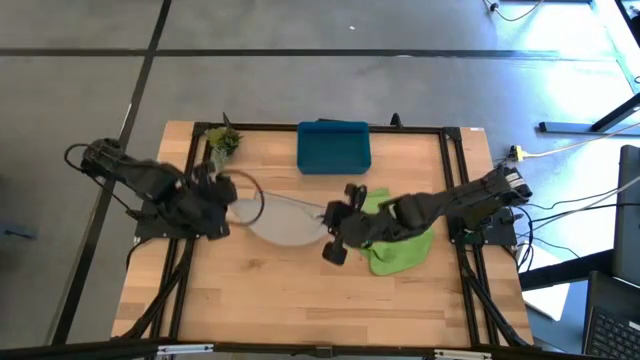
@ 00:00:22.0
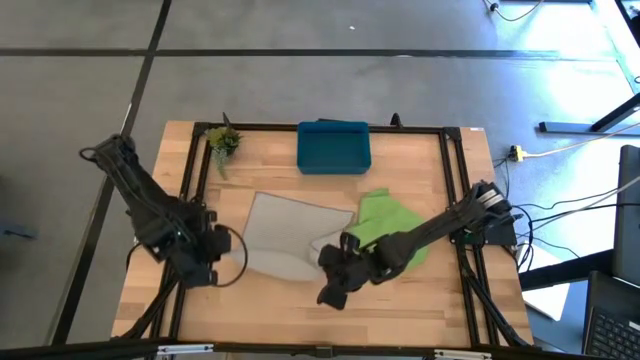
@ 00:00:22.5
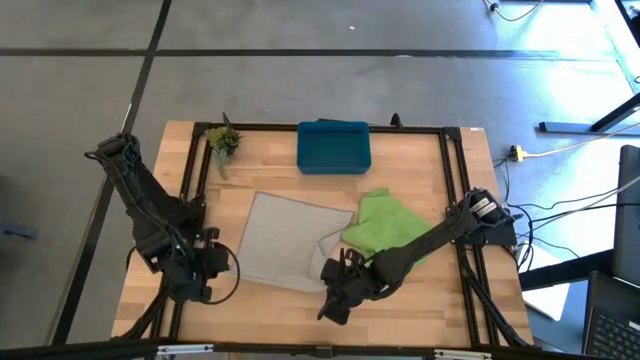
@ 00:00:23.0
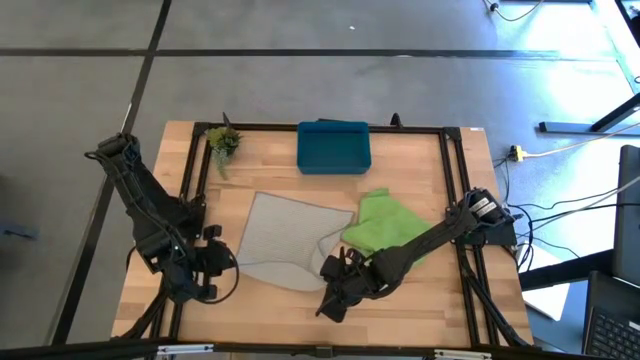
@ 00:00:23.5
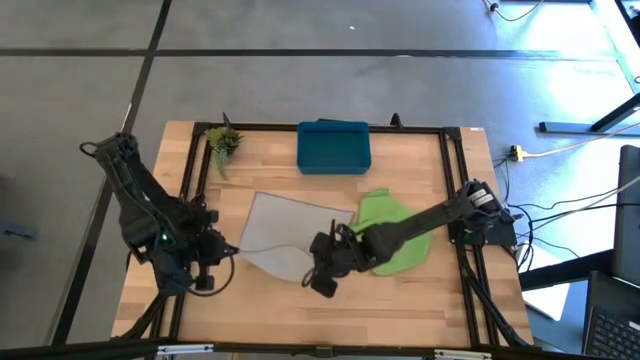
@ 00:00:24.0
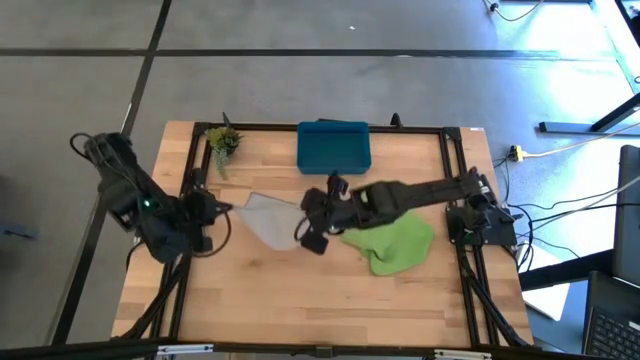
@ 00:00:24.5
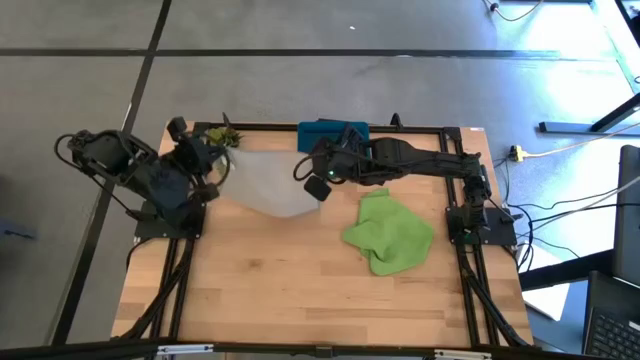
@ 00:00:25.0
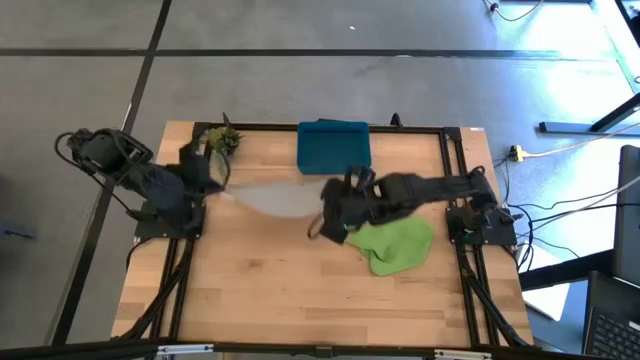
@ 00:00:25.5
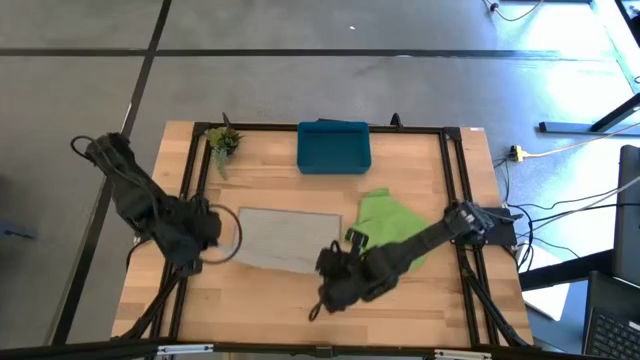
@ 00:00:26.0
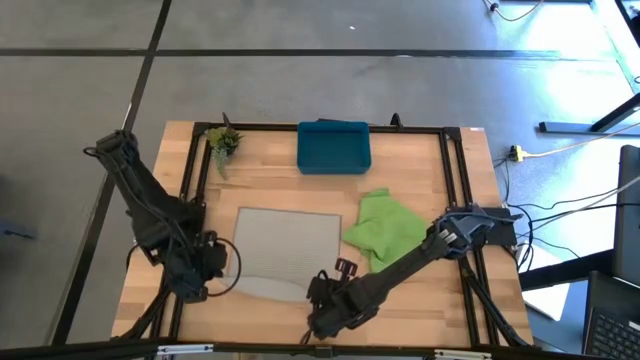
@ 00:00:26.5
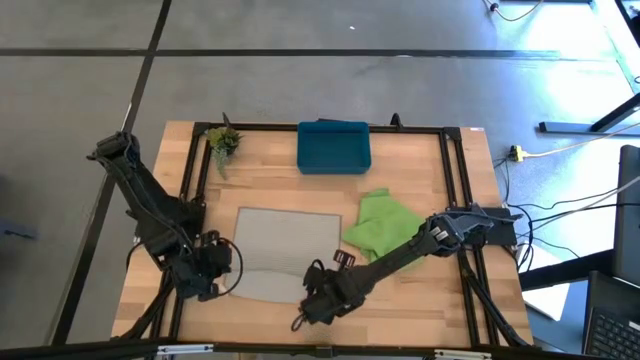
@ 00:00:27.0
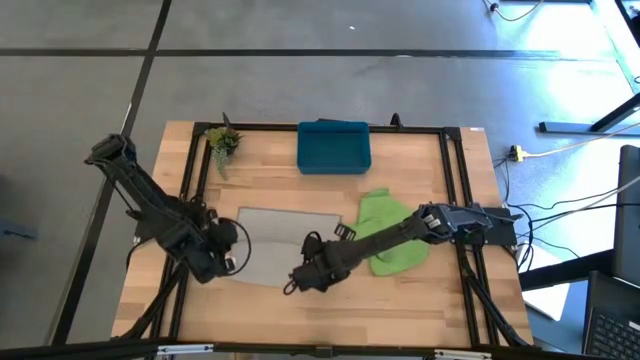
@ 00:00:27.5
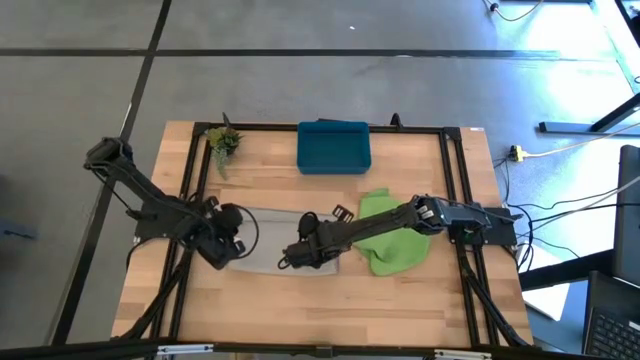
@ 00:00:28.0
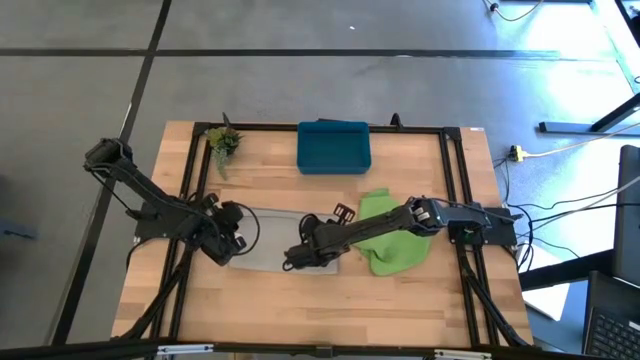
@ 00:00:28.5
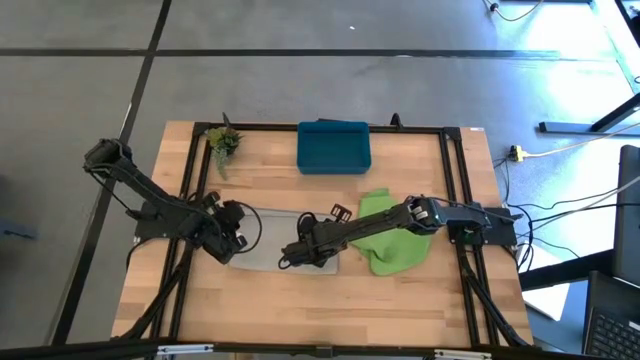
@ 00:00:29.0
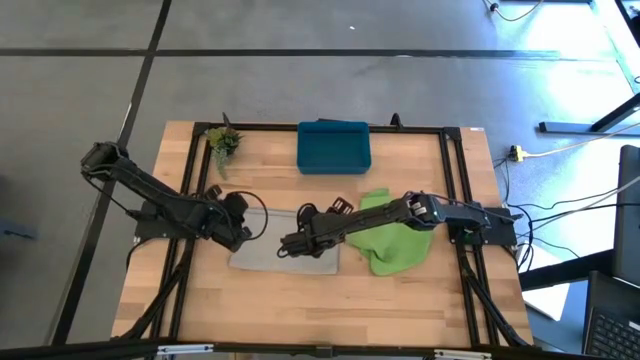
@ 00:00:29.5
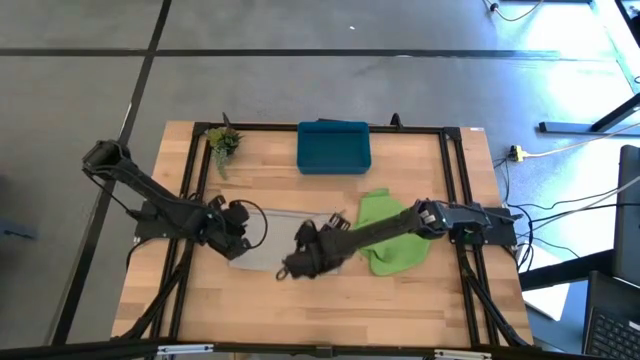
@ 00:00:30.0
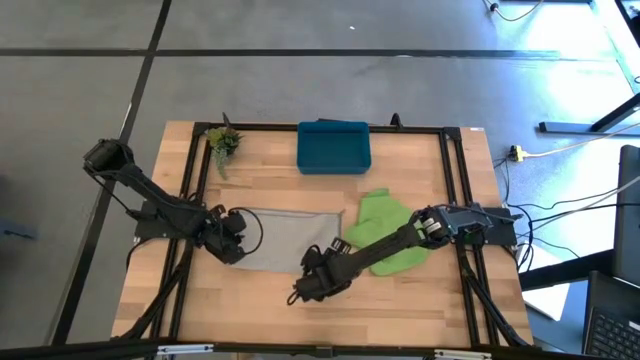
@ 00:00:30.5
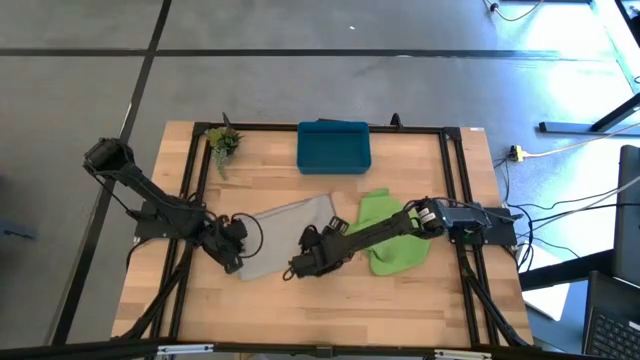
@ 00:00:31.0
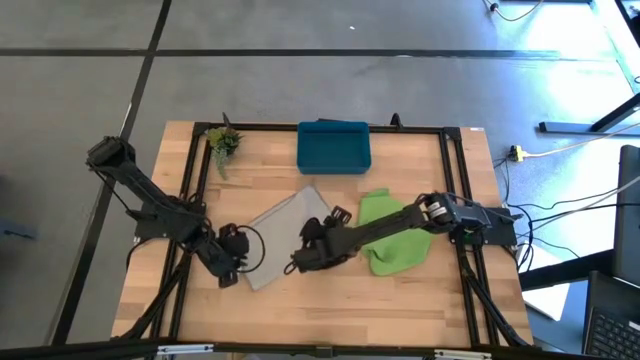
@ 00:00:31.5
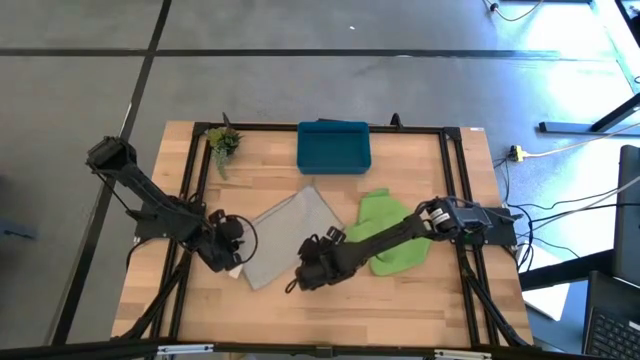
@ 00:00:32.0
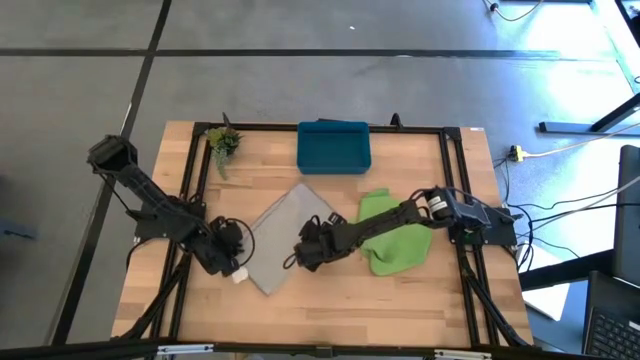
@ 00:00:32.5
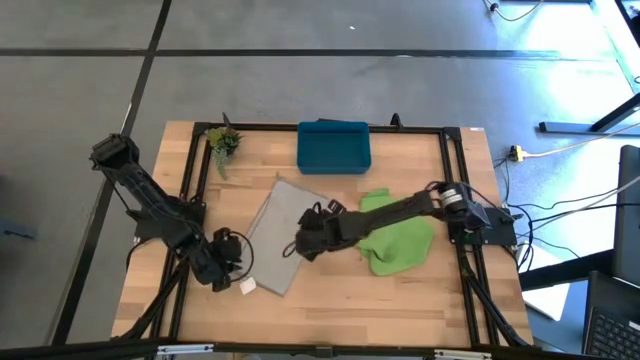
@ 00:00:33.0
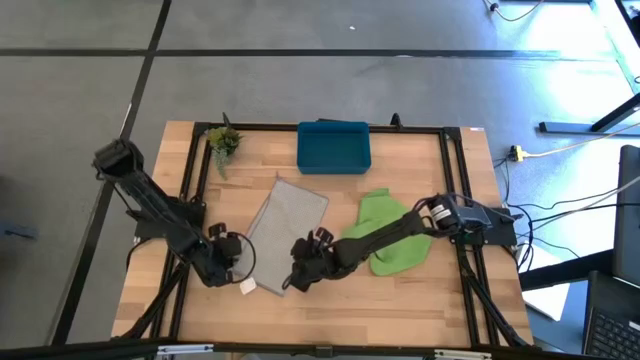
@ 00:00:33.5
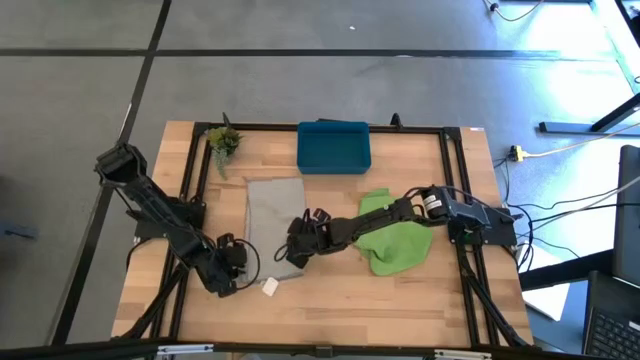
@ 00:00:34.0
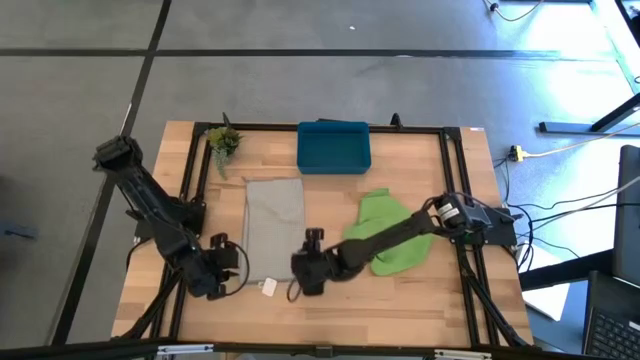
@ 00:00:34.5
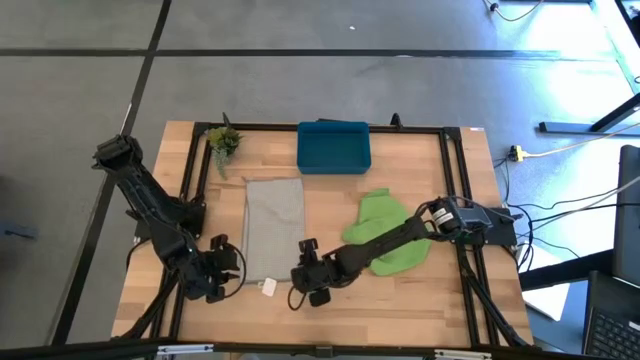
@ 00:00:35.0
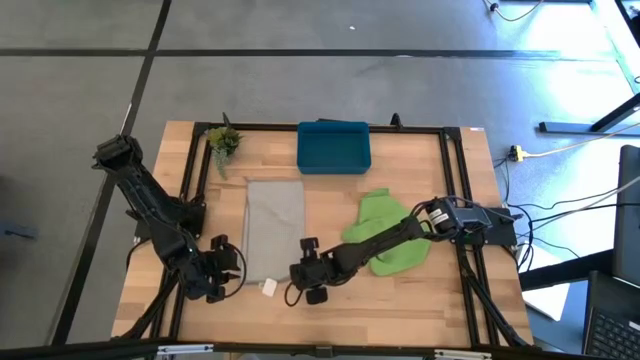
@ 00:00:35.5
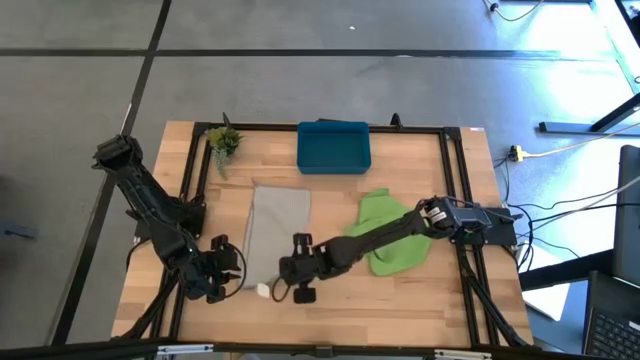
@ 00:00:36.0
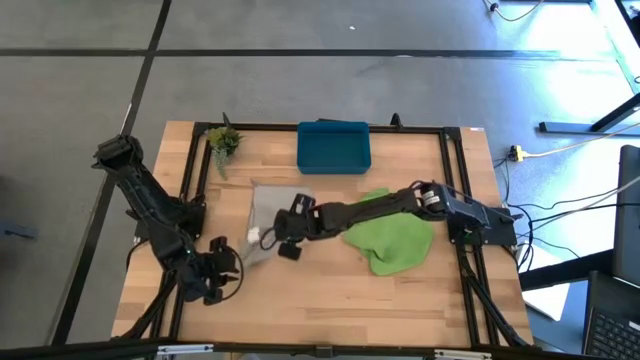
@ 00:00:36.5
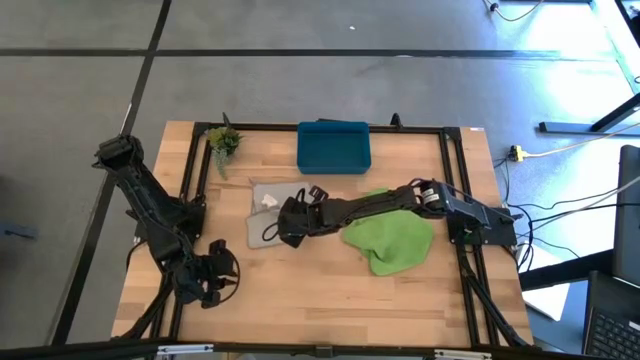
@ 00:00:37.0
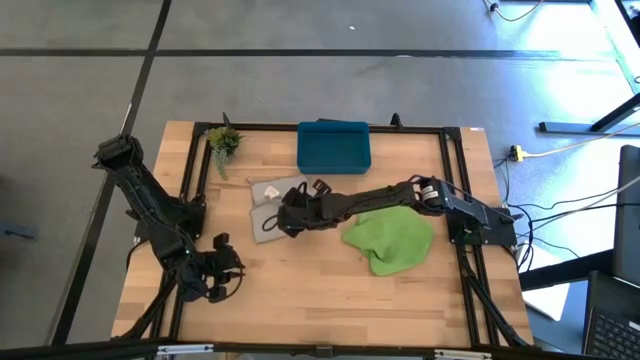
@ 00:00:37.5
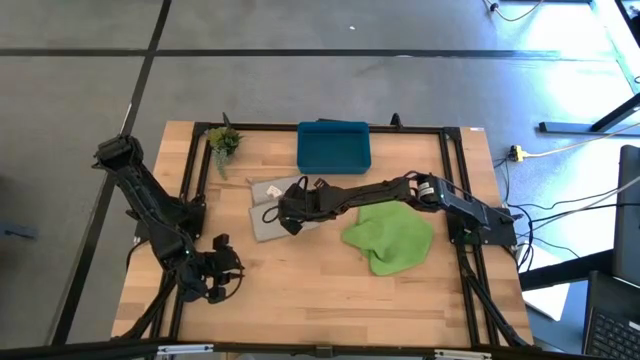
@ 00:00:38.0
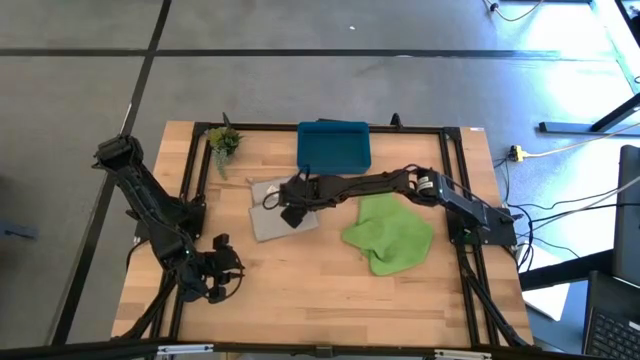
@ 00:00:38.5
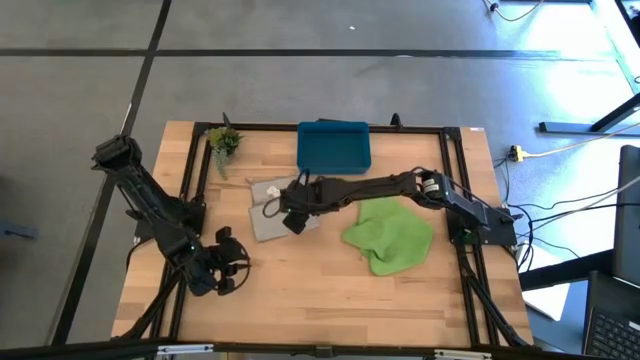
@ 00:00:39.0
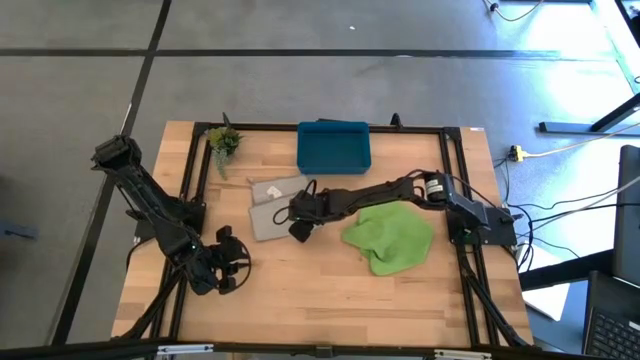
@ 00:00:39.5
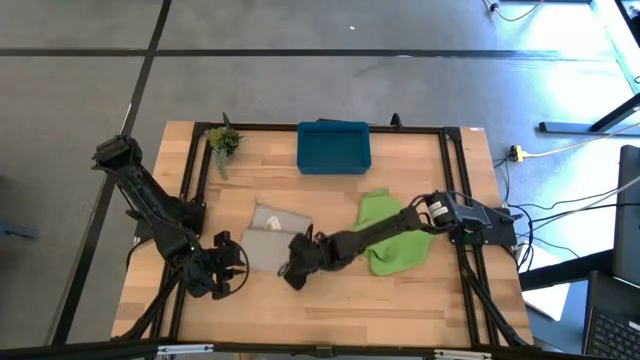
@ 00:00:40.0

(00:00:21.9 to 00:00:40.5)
Task: Roll microfiber towels into tight, uniform cylinder then place into a basket
Roll the gray microfiber cloth

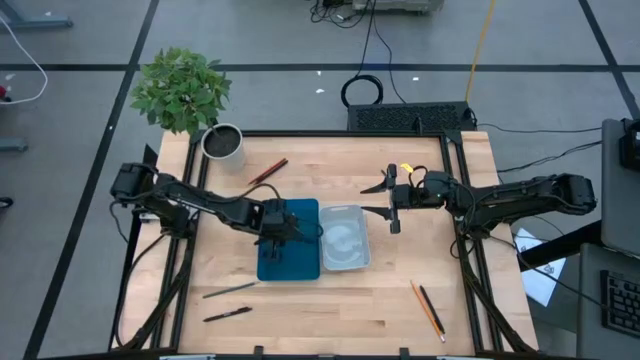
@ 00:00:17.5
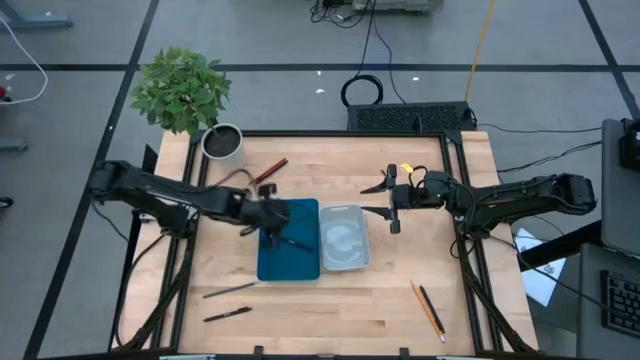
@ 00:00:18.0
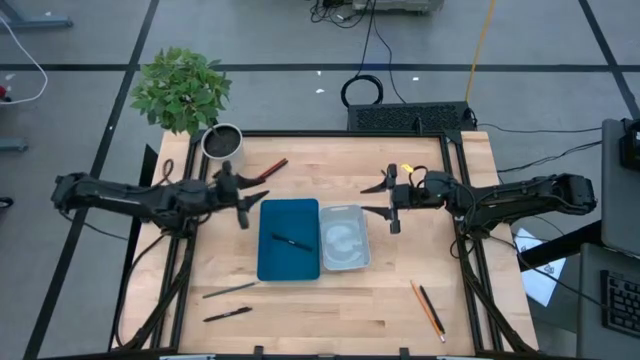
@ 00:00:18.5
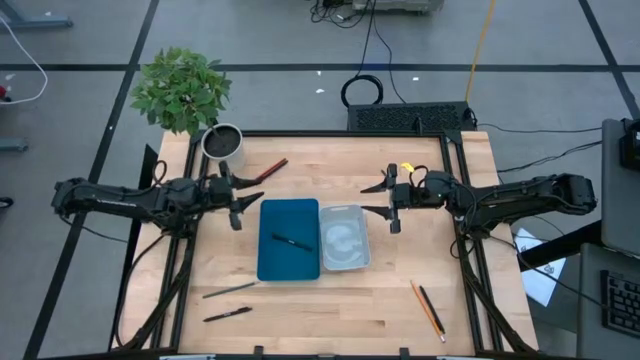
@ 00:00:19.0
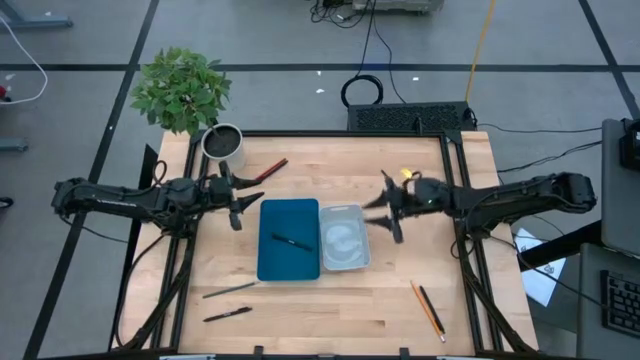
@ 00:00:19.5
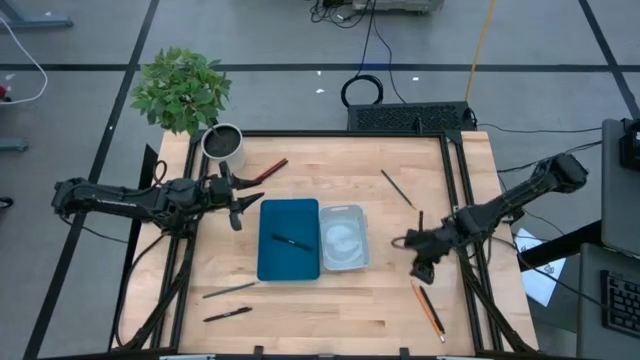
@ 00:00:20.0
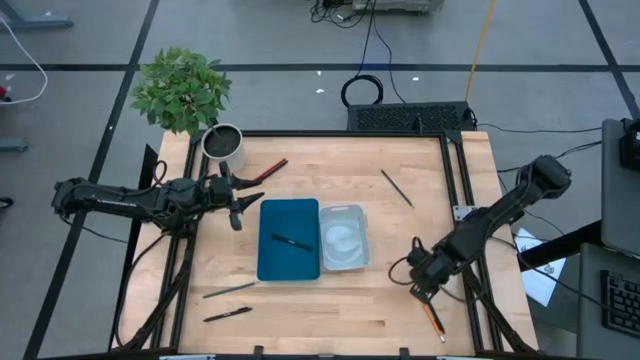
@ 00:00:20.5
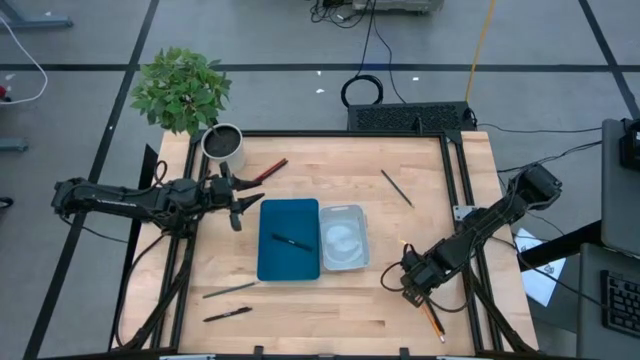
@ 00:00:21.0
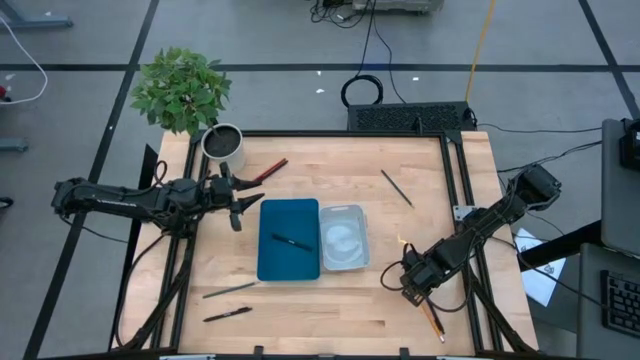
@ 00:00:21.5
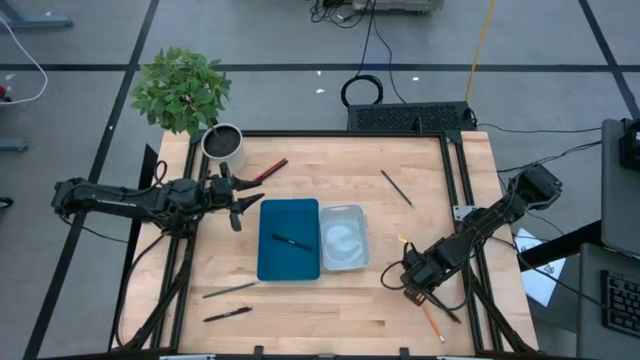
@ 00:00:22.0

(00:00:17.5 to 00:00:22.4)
Task: Sort pens & pencils
Put the bottom right black pen into the blue bin
